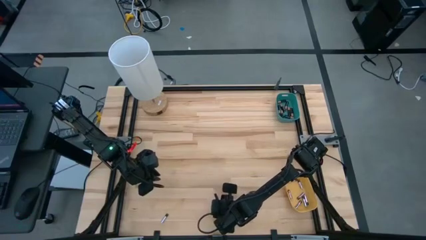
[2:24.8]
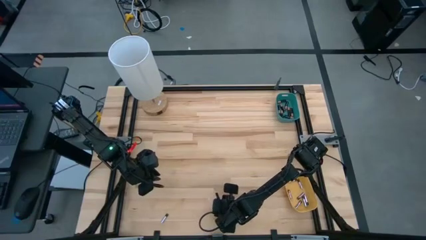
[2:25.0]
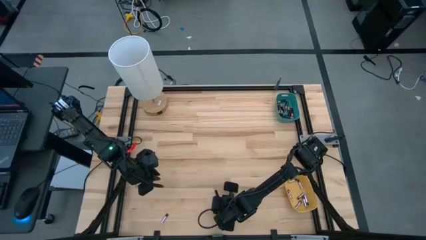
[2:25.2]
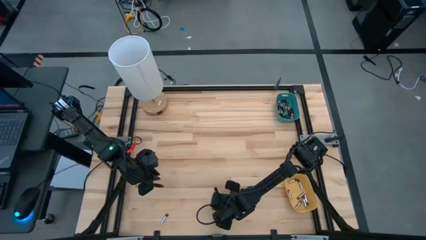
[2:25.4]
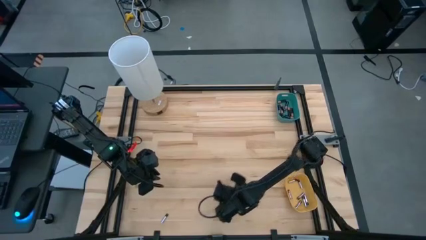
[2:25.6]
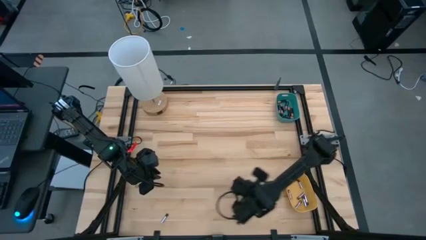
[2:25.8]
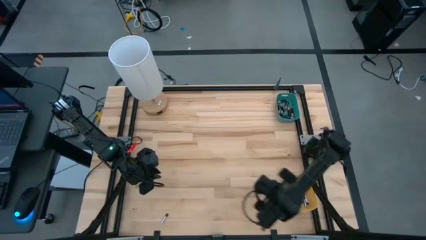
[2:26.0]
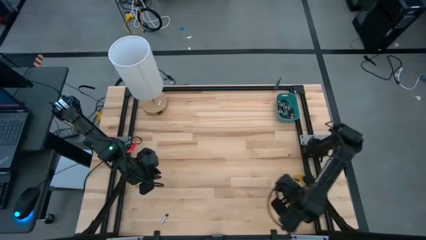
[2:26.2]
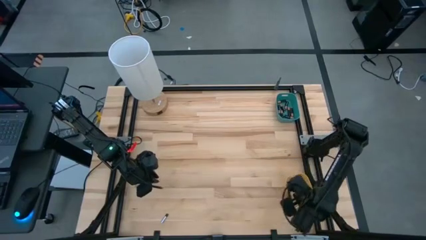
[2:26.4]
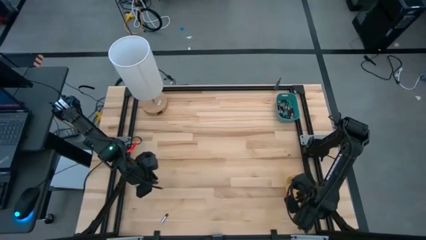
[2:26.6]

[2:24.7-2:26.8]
Task: Sort batteries
Put the silver battery into the yellow bin

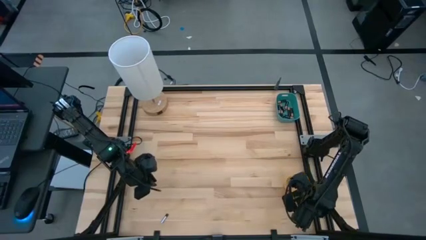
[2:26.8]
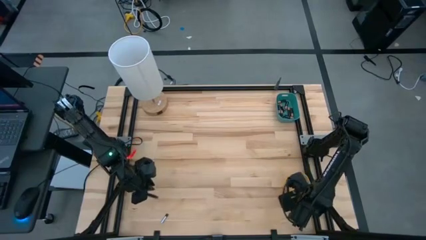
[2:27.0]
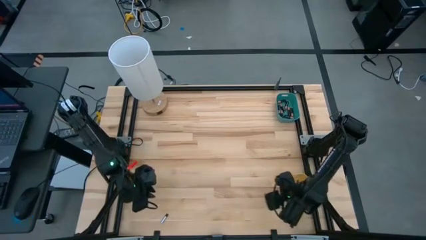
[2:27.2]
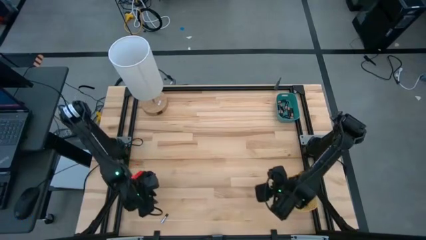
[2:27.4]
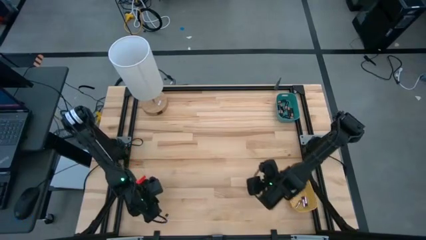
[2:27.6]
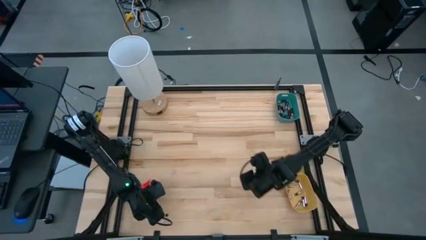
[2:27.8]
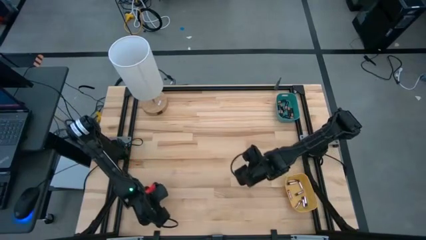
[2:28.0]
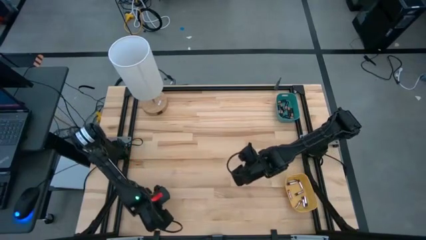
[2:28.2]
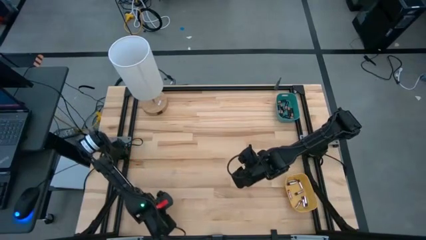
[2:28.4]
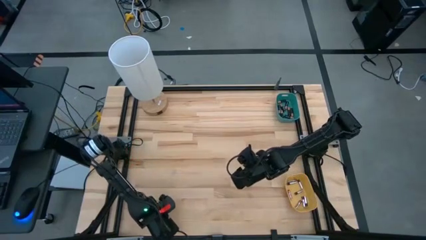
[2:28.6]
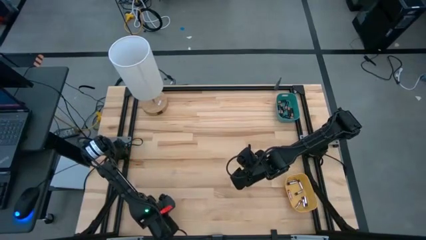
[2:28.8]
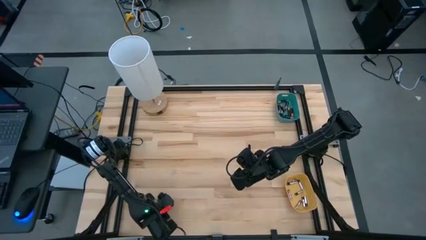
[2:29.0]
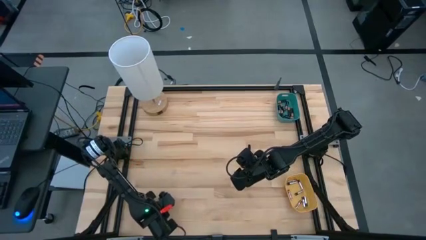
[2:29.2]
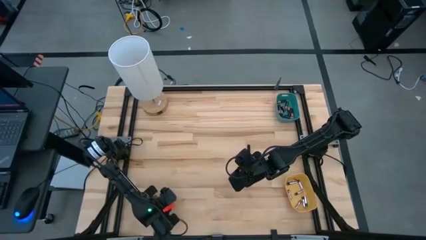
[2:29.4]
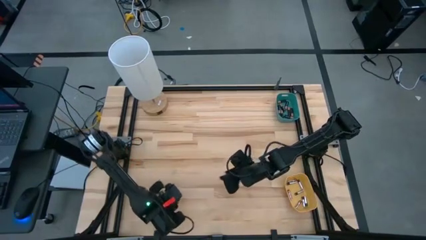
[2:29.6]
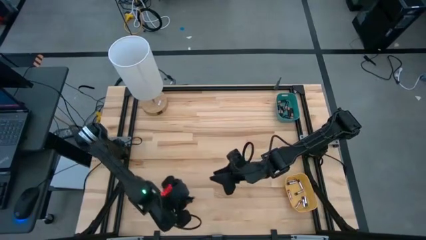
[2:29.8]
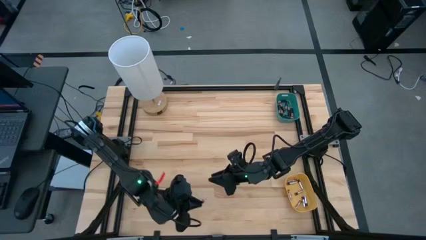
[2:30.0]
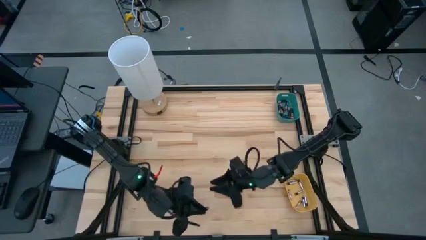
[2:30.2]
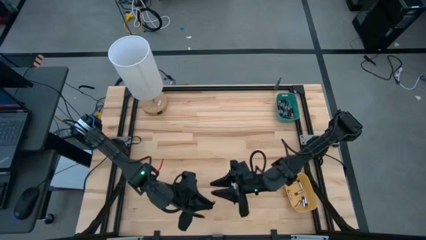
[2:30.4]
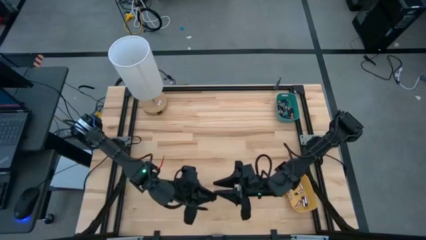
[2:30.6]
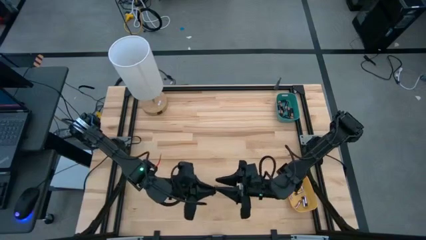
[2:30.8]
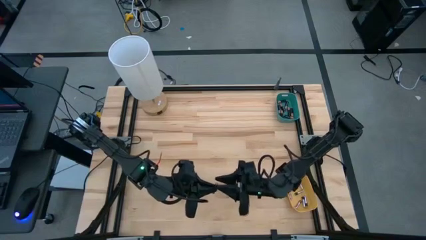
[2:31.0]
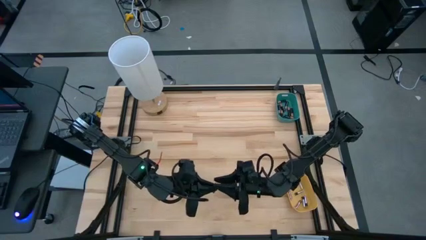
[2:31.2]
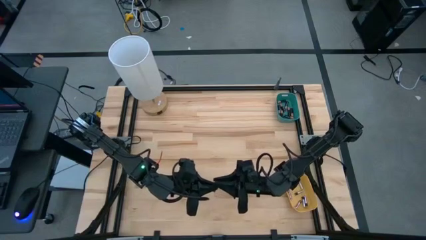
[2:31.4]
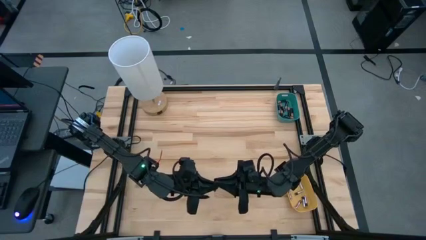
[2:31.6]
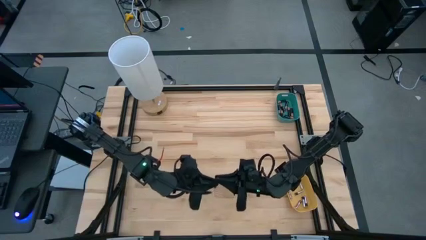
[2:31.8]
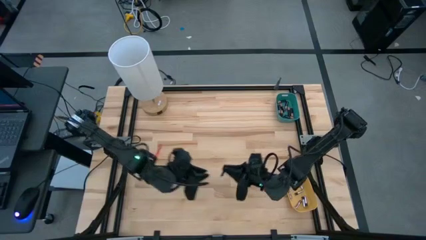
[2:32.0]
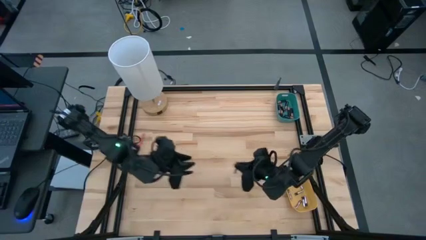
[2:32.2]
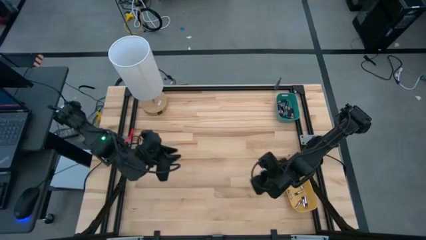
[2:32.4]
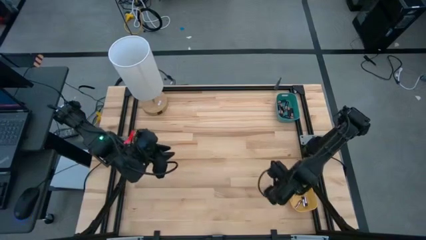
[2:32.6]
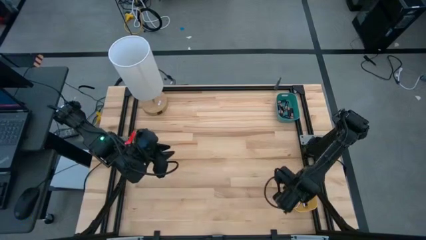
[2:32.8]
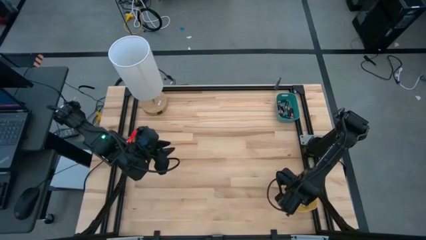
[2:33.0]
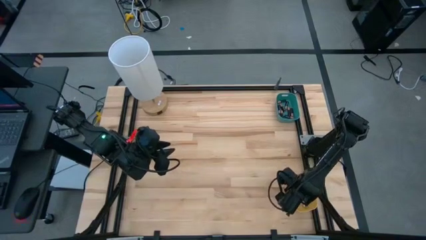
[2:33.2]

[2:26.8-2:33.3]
Put the silver battery into the yellow bin

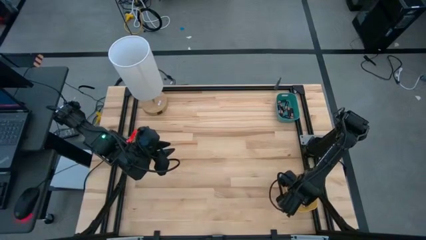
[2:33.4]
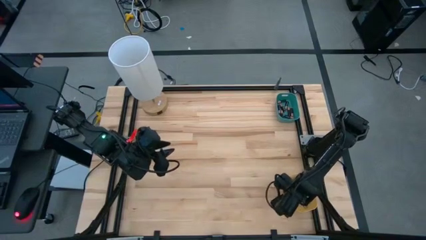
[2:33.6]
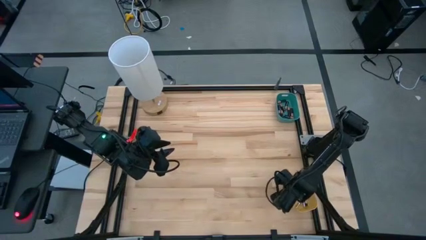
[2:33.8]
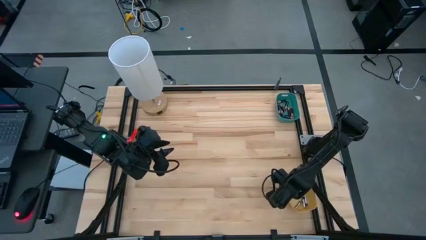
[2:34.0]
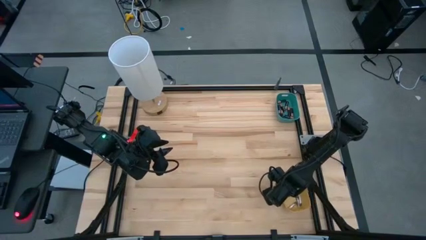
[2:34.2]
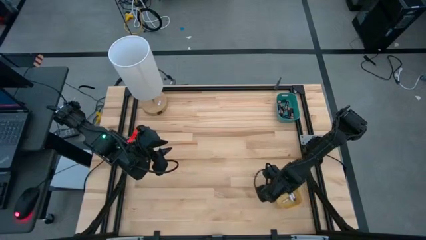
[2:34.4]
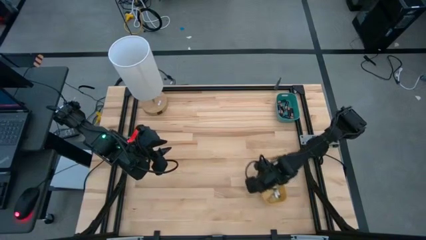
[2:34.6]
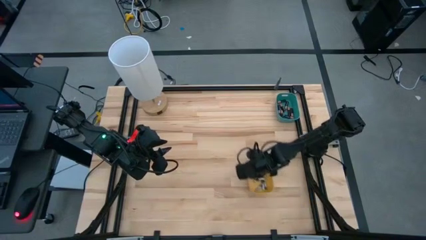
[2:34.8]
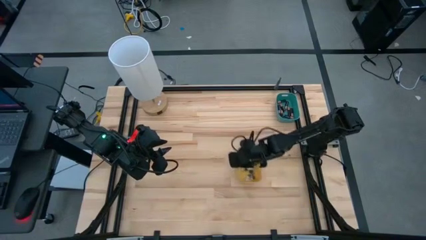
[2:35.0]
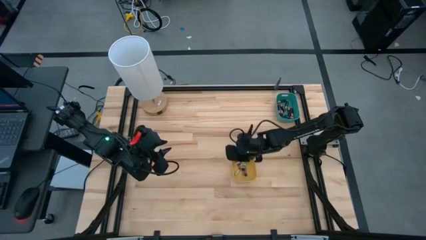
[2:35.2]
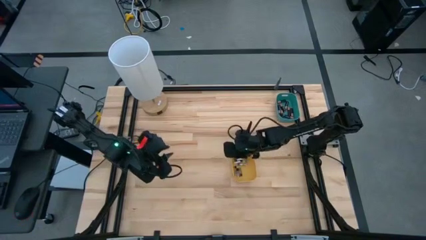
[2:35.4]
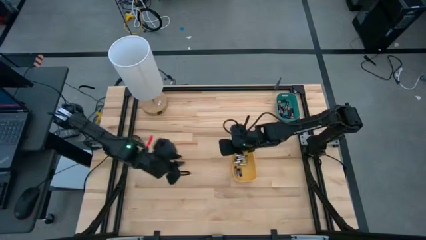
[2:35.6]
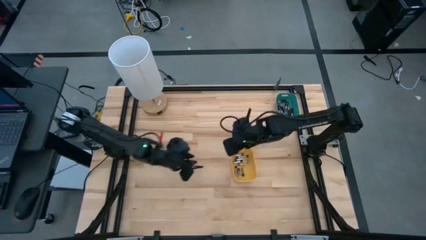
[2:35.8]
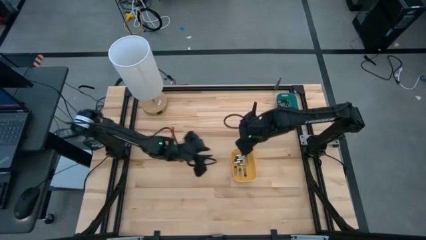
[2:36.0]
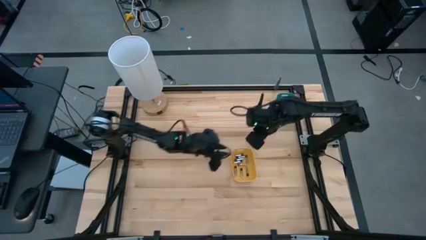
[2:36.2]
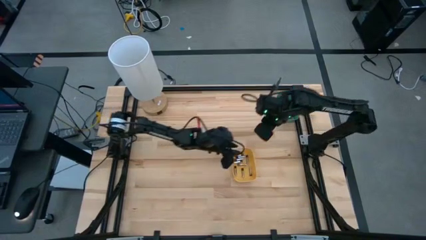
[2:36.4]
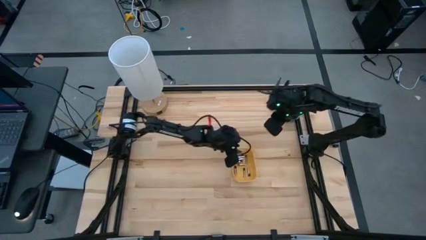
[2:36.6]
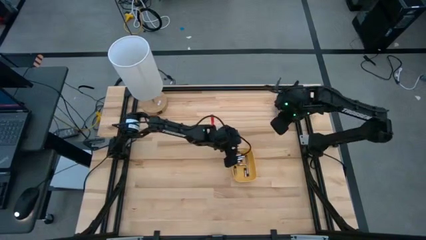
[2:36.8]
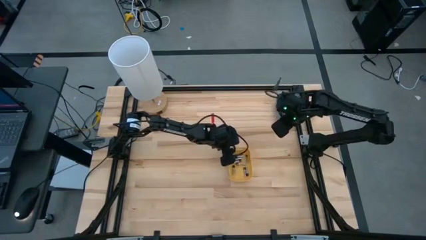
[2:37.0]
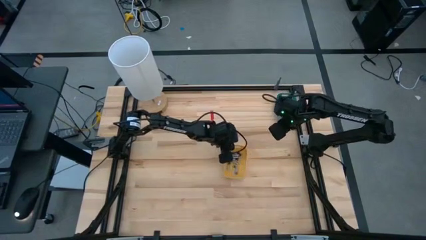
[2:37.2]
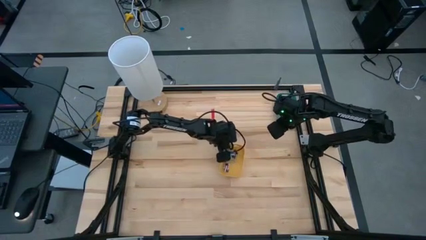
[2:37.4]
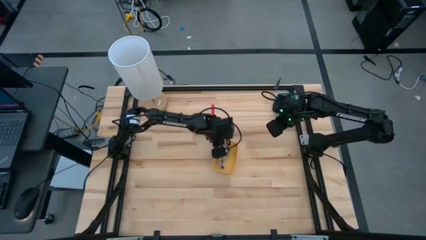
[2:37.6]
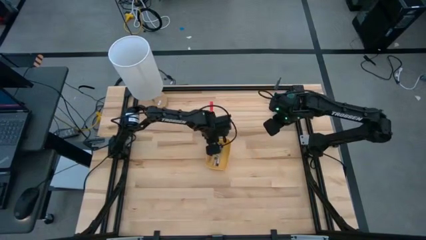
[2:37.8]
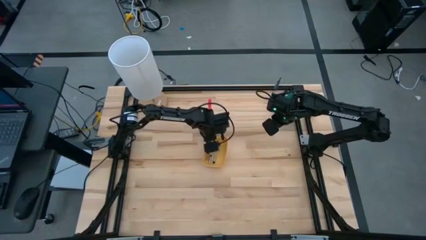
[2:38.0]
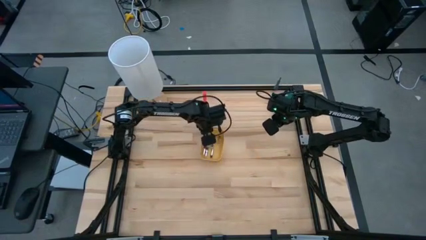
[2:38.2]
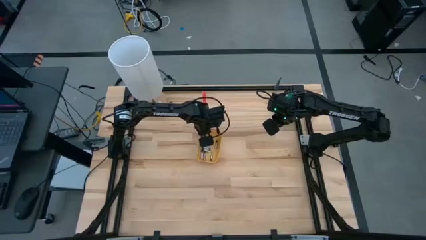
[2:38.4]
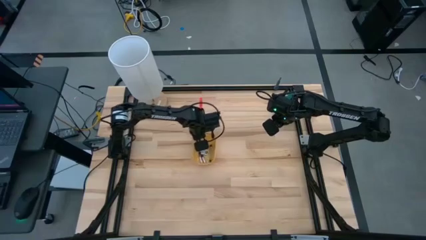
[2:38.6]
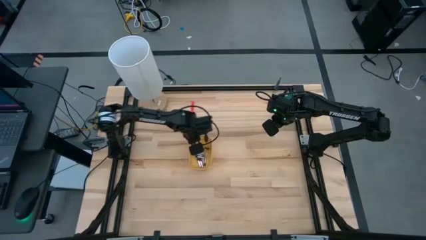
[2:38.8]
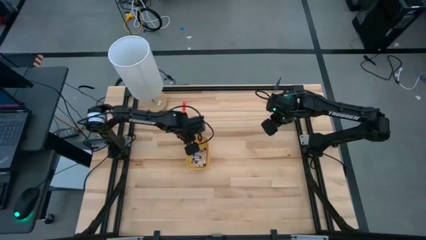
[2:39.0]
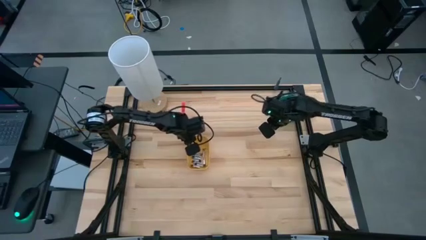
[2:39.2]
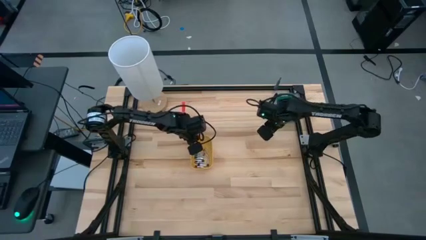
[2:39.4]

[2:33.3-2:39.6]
Move the yellow bin from the bottom to the middle of the table

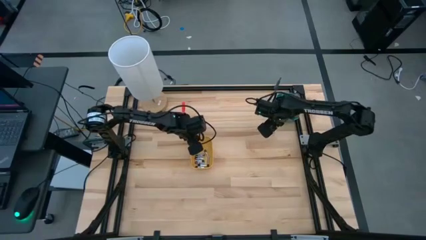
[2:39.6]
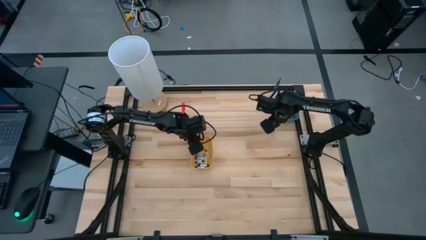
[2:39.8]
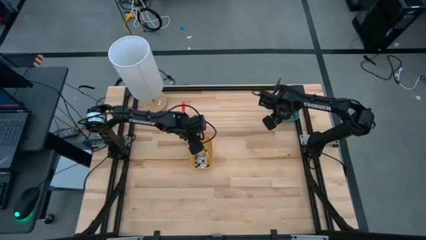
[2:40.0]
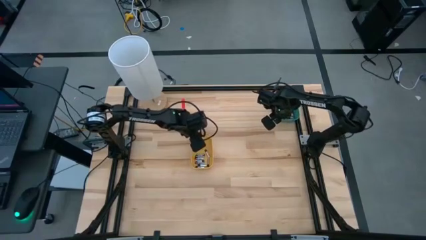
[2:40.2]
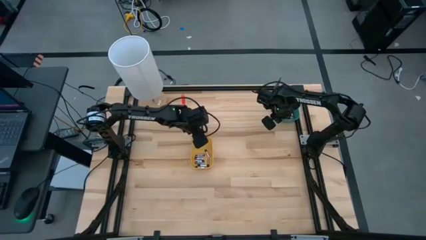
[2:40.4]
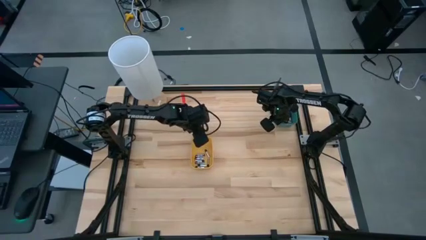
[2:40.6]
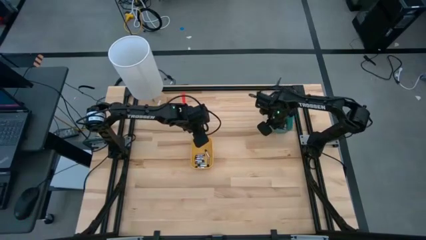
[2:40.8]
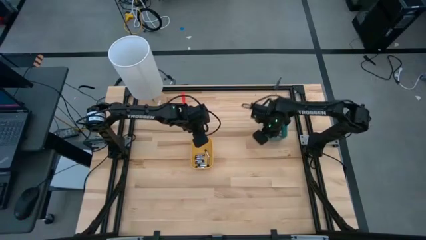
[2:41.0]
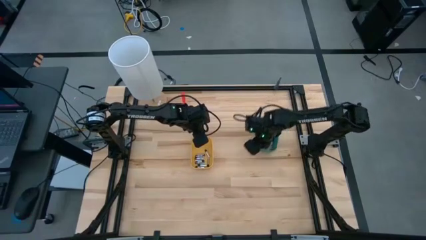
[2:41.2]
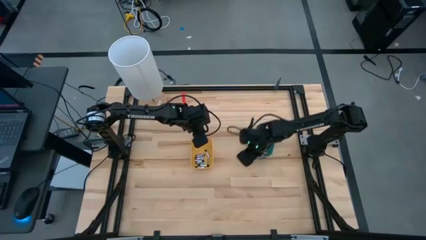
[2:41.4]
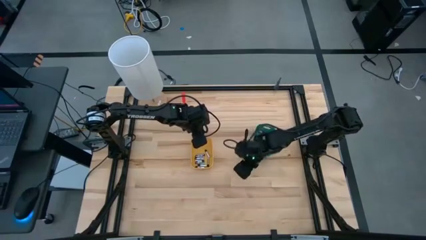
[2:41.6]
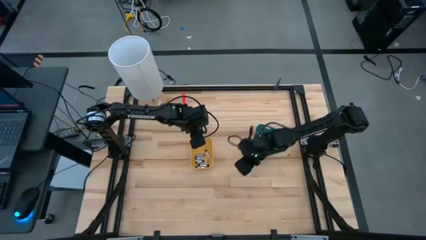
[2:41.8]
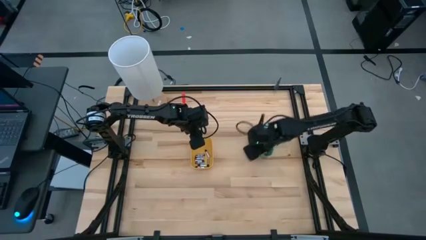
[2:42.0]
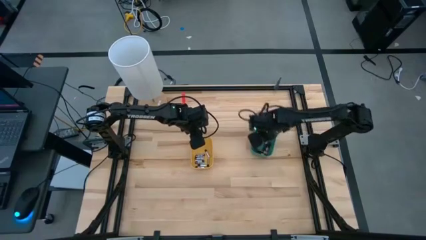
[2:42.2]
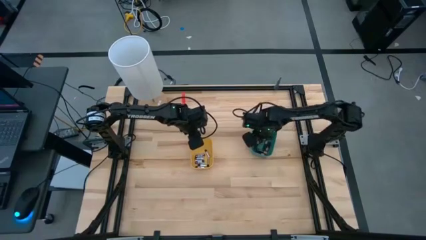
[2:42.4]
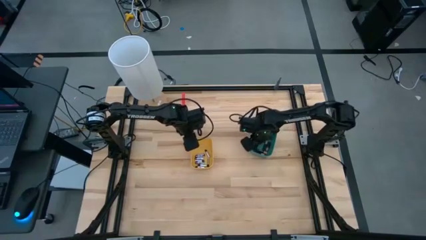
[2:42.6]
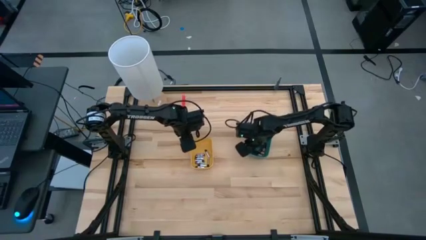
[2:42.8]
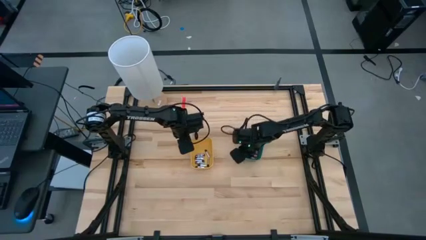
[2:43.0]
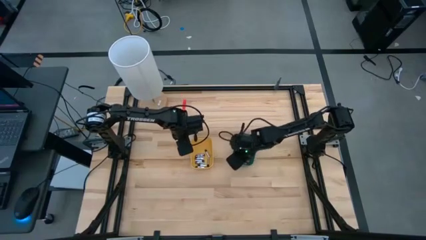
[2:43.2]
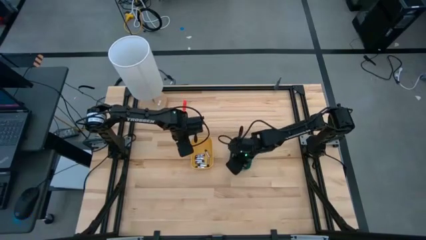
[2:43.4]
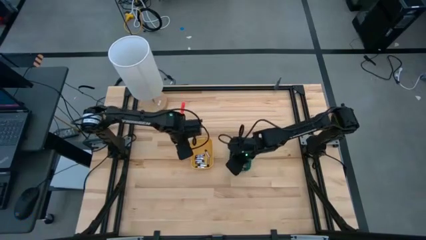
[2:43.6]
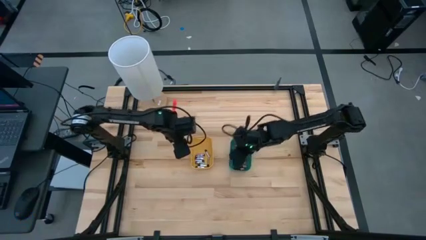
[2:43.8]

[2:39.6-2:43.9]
Move the blue bin to the middle of the table
